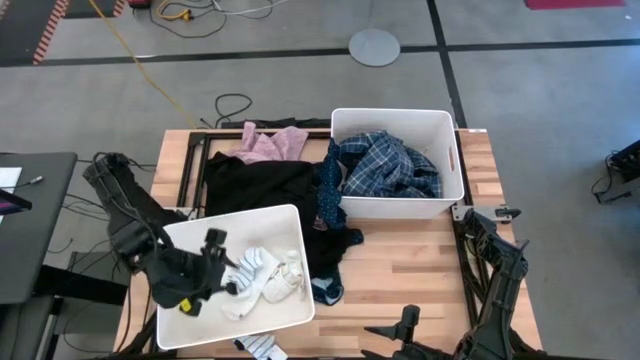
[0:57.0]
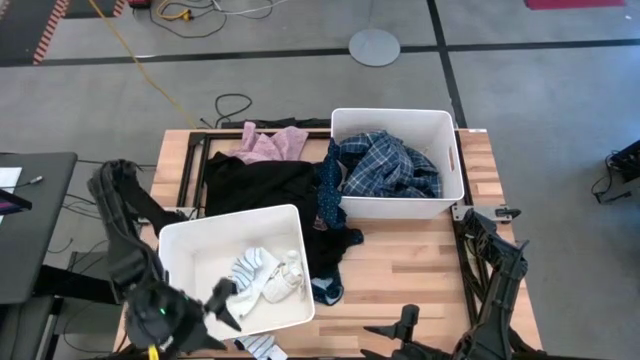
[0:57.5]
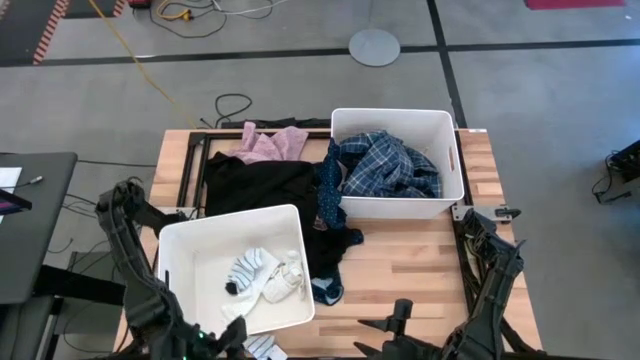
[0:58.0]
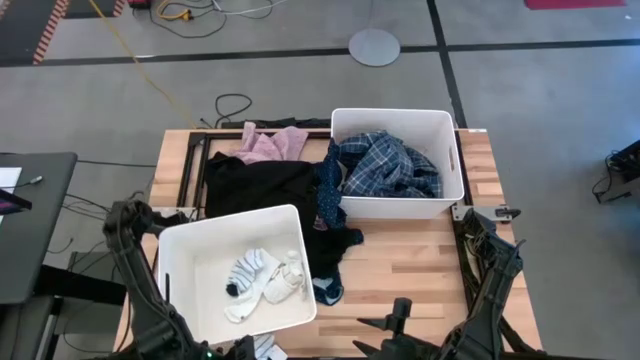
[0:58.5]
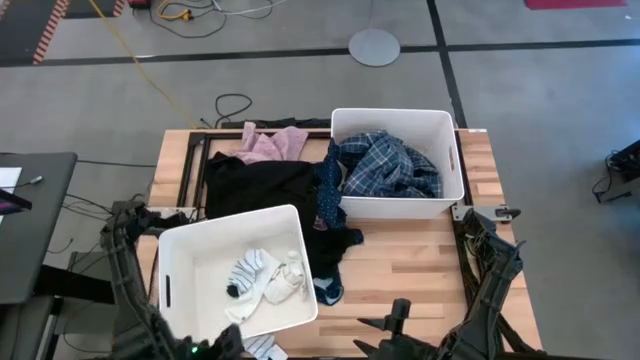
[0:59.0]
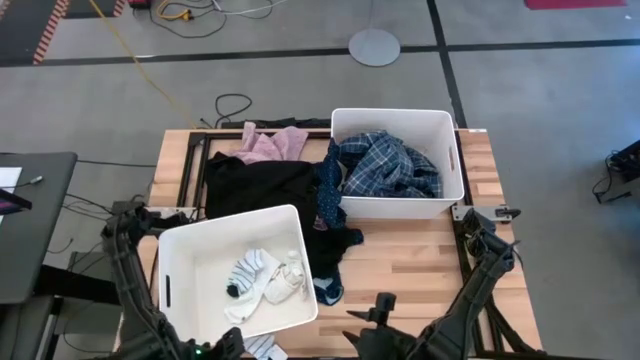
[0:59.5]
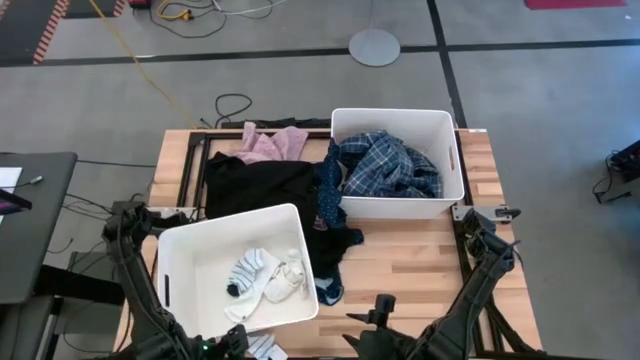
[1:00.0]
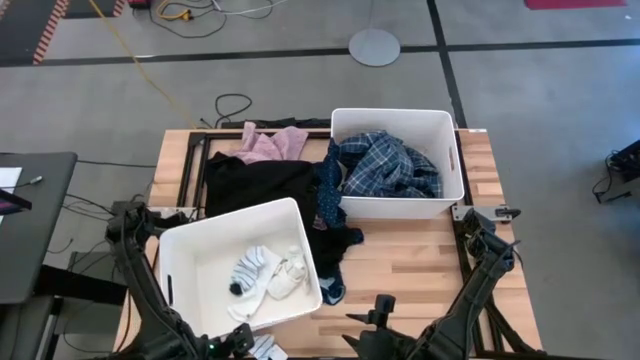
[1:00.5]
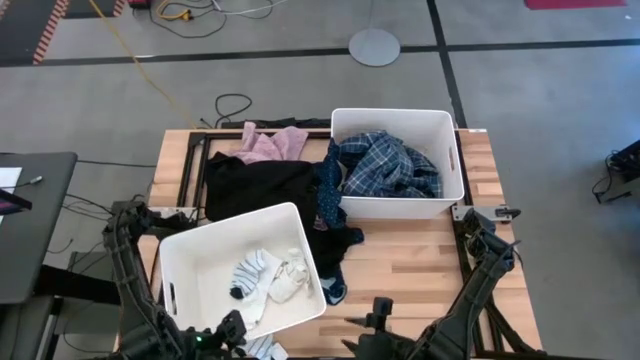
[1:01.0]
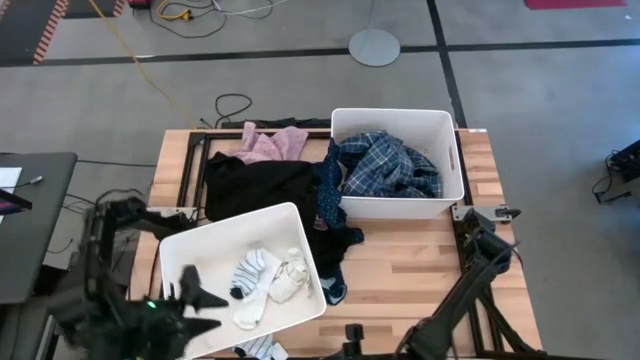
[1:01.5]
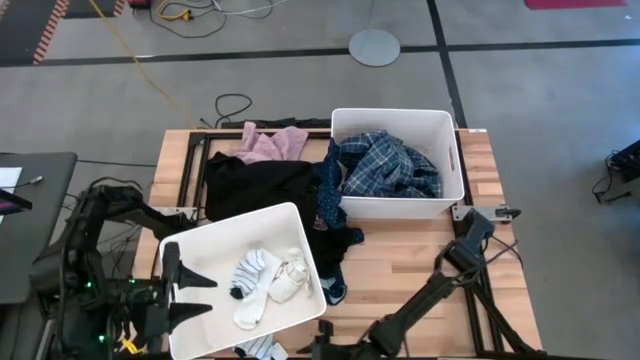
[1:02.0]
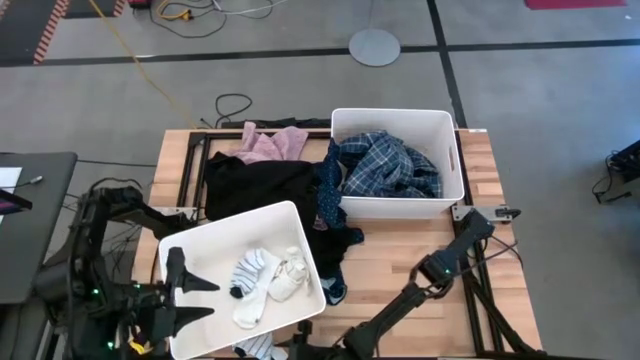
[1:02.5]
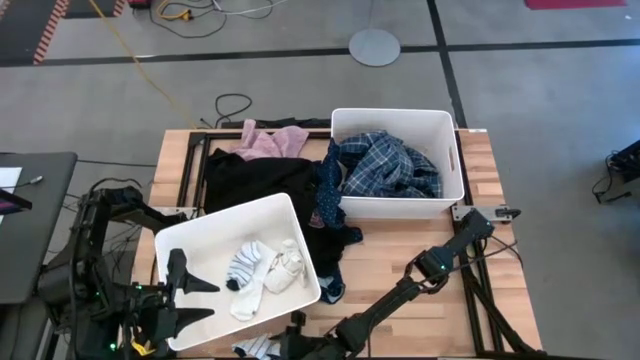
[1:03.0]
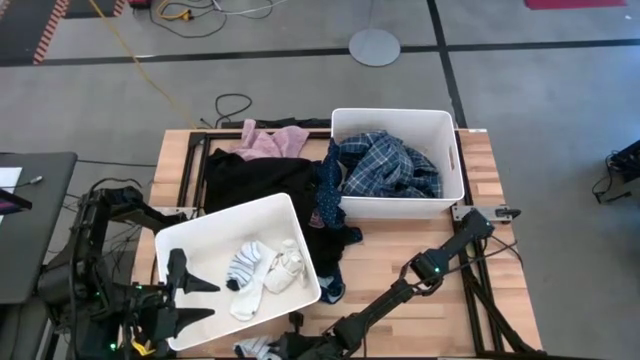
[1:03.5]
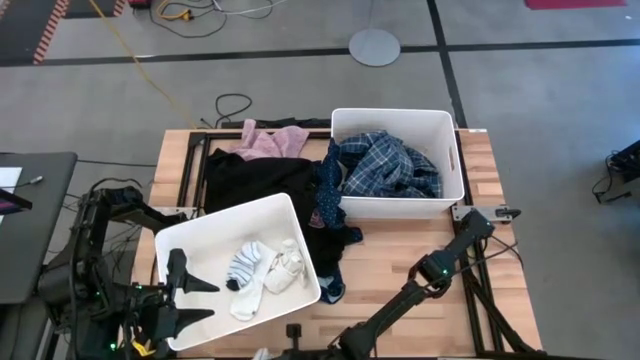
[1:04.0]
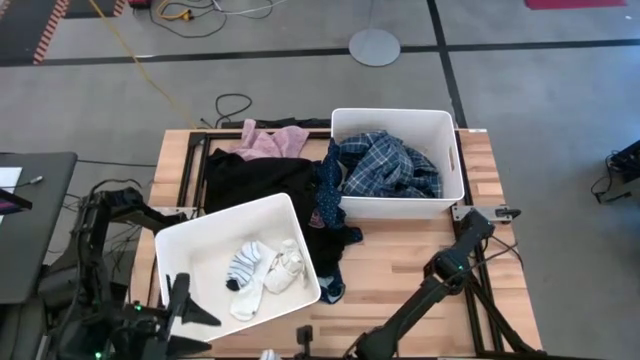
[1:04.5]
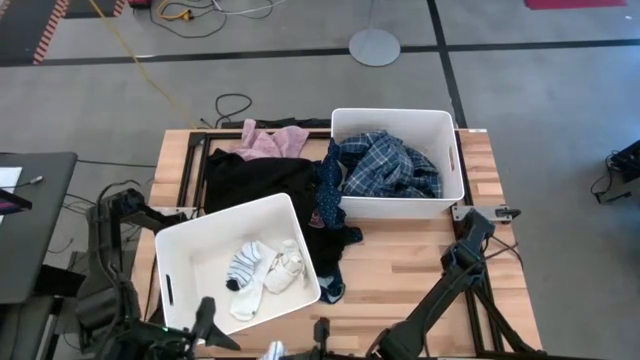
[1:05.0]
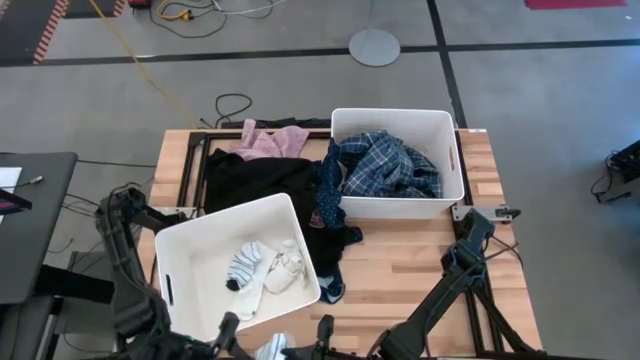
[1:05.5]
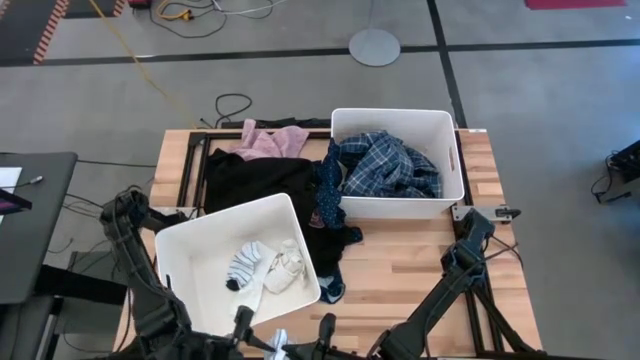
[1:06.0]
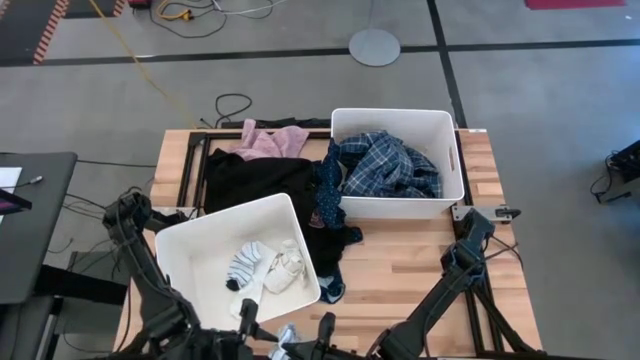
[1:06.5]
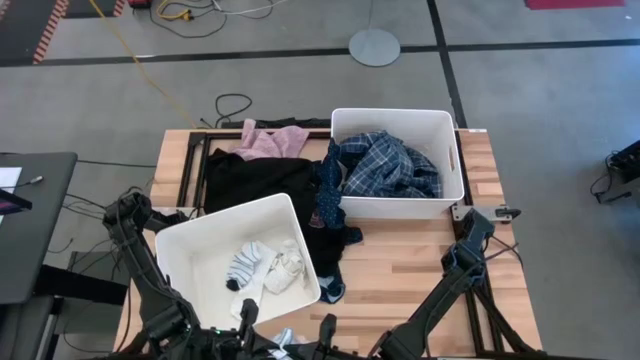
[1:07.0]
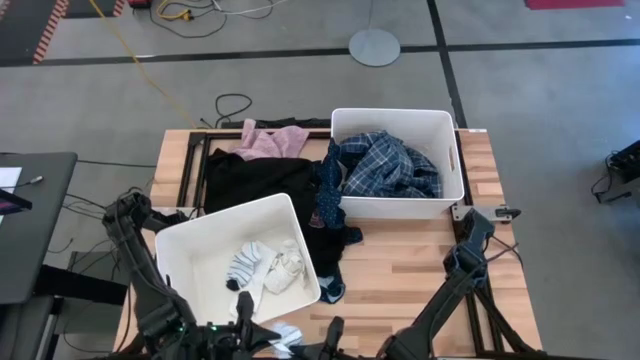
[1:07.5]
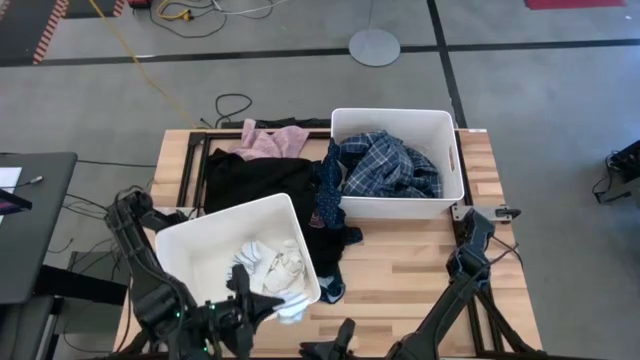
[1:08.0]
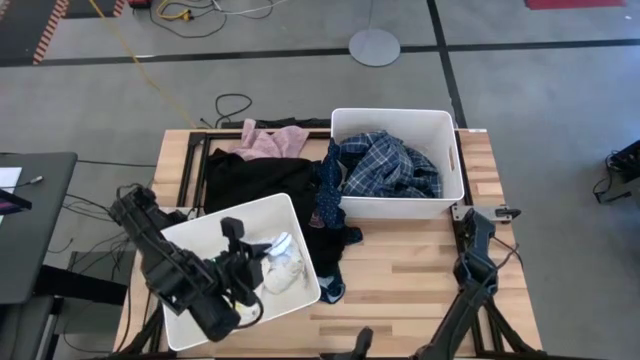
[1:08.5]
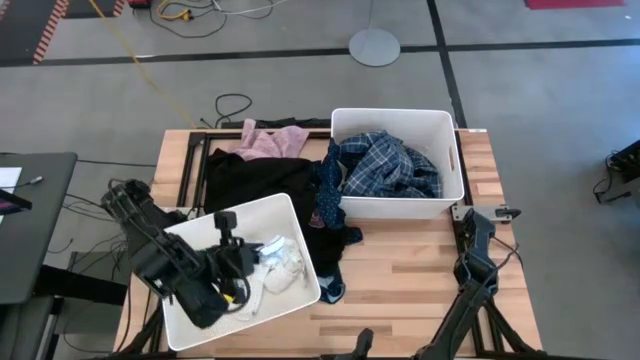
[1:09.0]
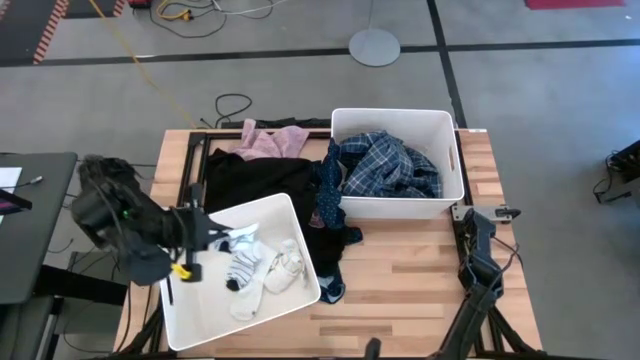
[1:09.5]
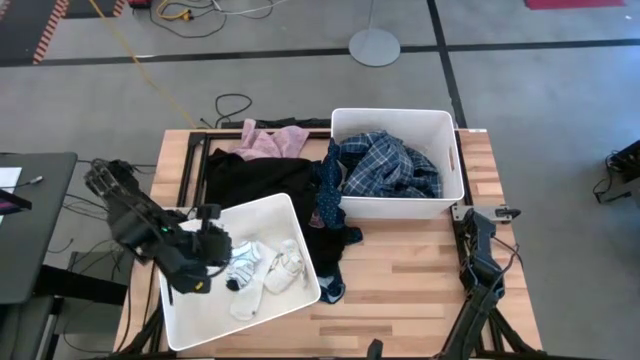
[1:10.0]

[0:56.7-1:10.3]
Task: Sort clothes
Put the striped sock into the bottom laundry bin

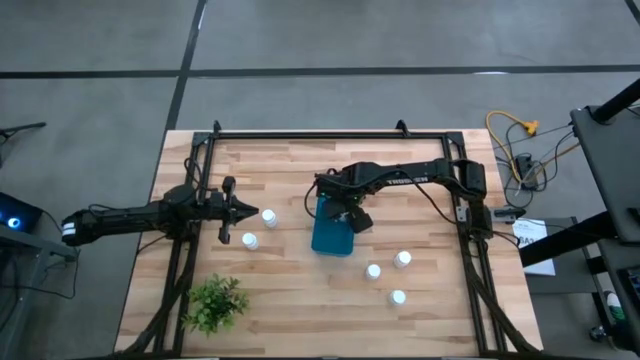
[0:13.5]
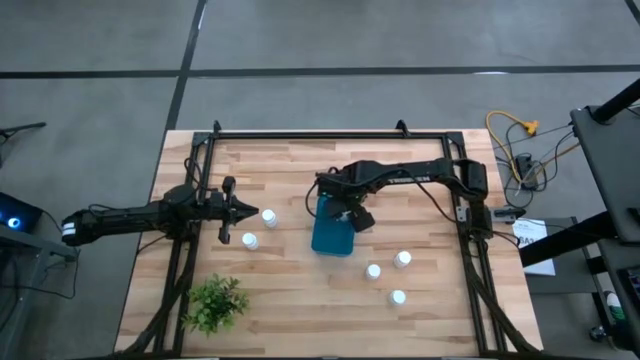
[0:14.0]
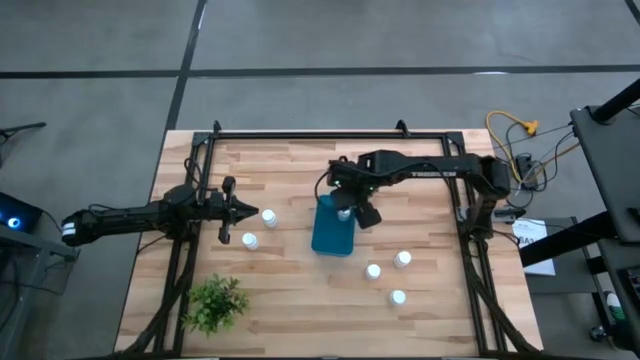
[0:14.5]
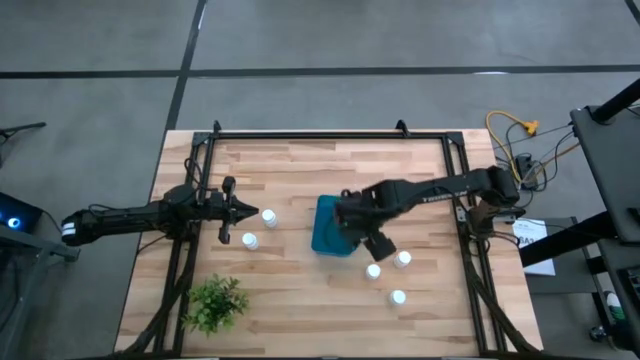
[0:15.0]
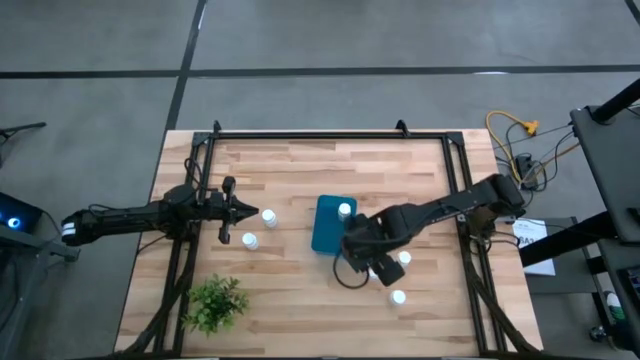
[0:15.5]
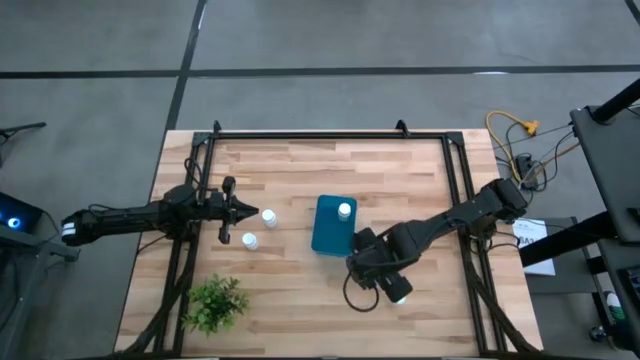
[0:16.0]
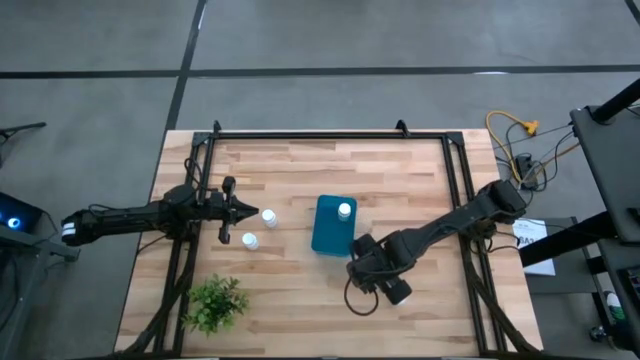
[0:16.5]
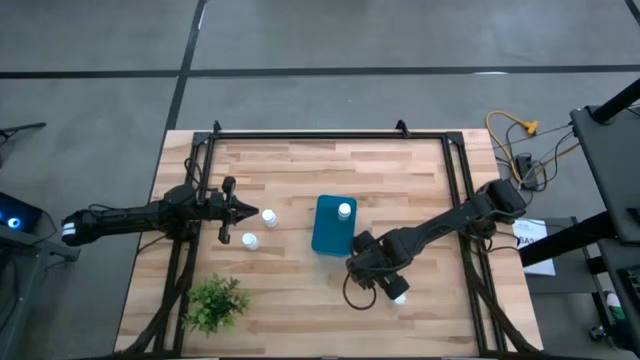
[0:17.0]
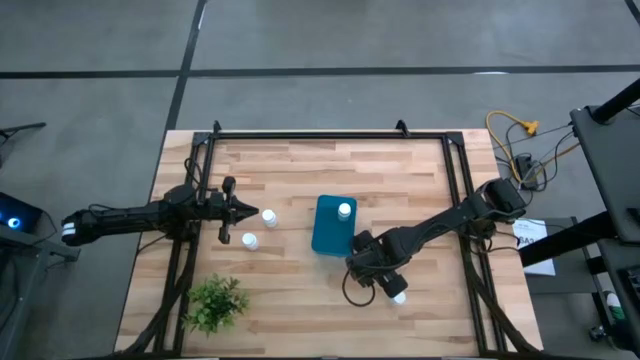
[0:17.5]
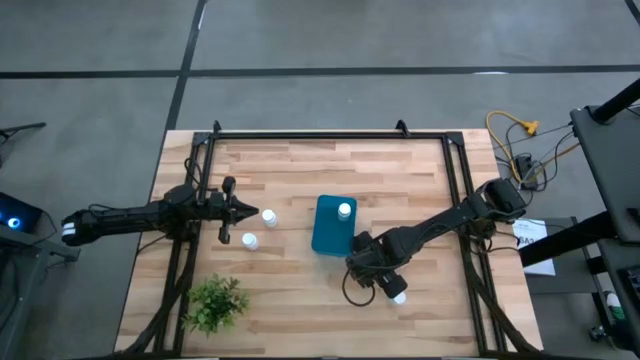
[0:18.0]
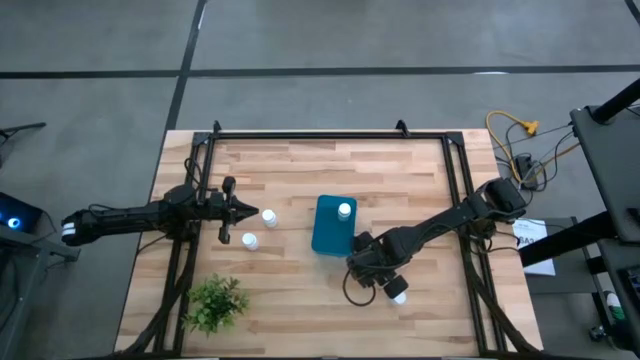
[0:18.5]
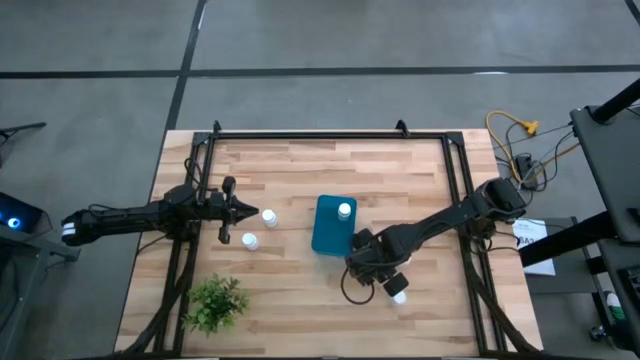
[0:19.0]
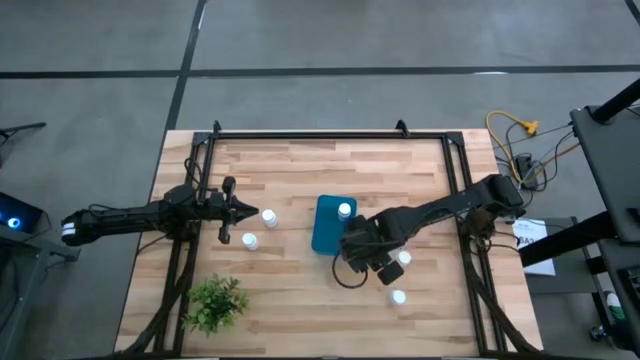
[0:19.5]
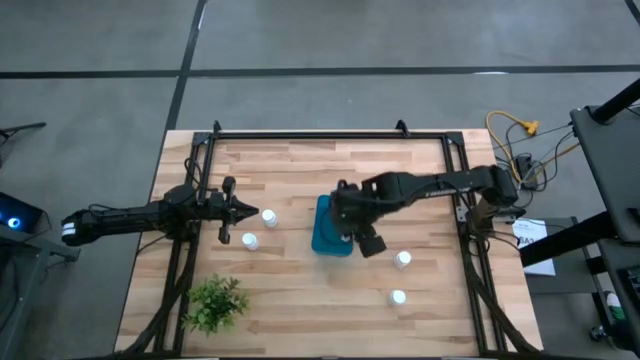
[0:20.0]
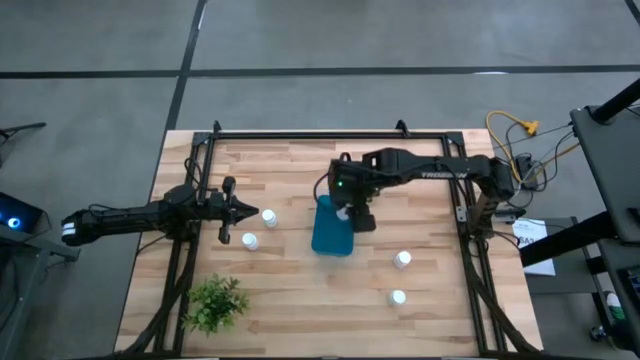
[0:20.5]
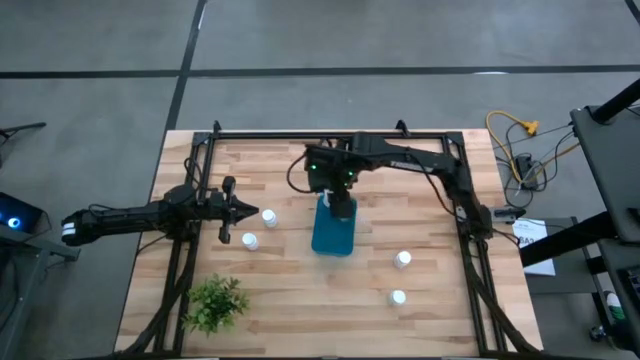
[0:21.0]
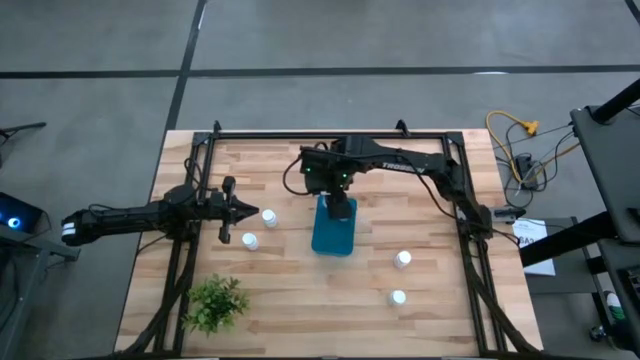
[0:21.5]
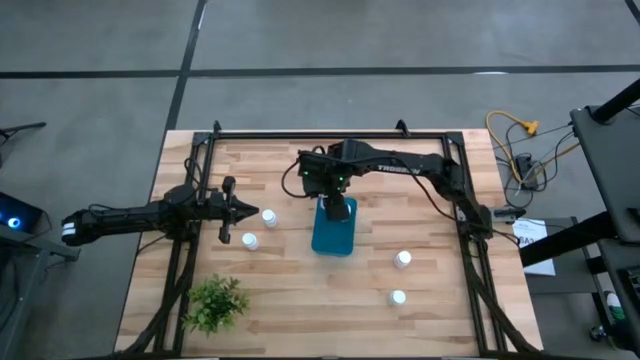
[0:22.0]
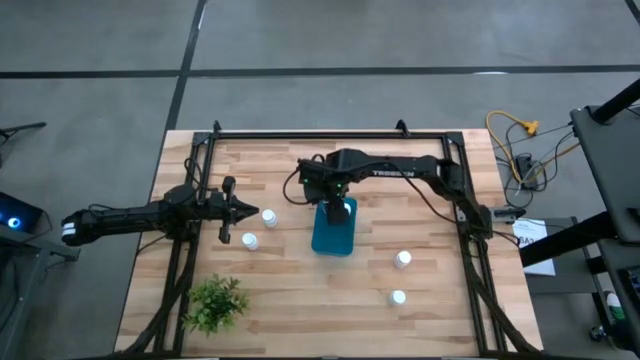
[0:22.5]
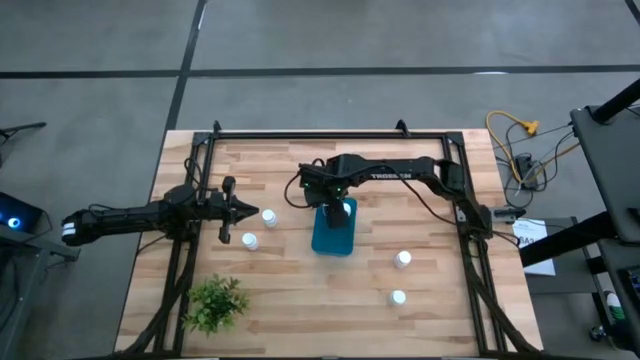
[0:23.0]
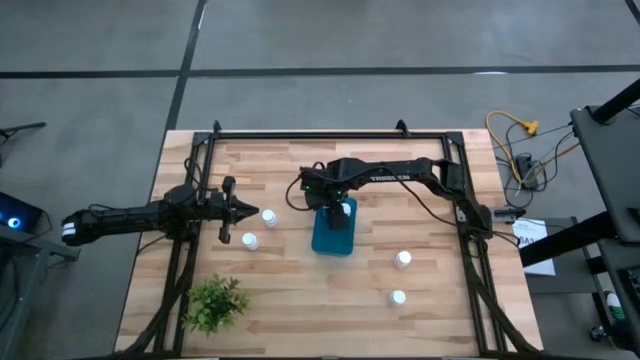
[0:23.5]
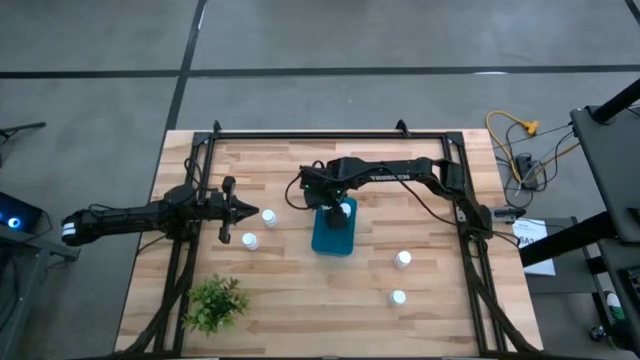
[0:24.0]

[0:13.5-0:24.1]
Task: Pick and place pill bottles into a basket
Put the medicine bottle into the blue bin
